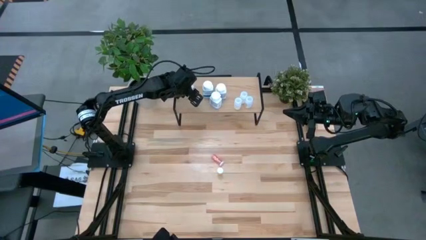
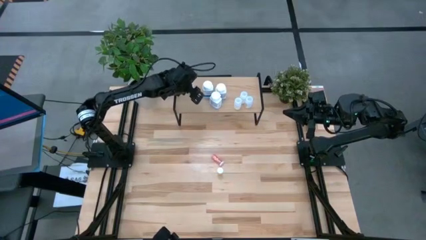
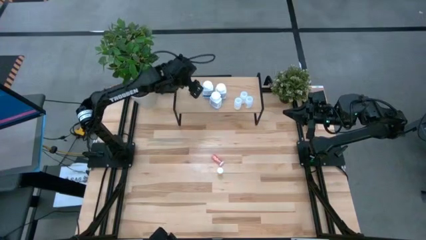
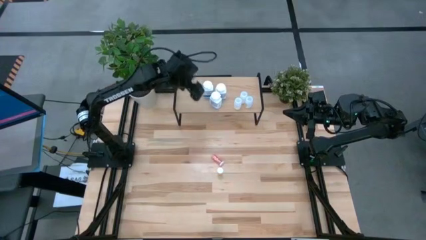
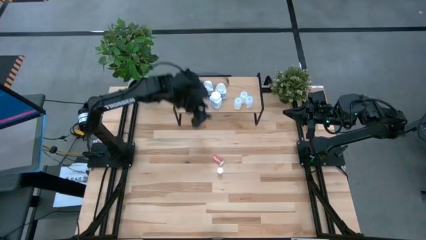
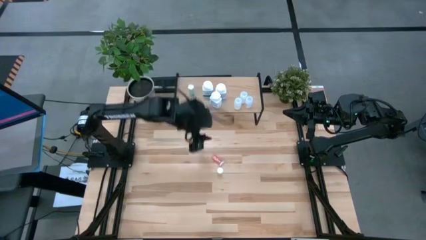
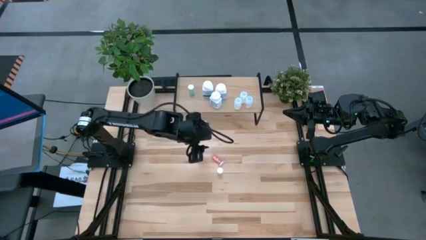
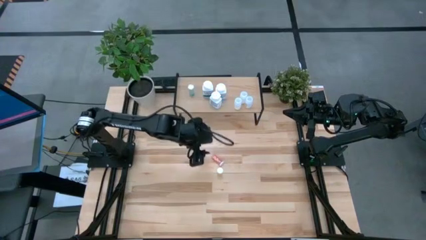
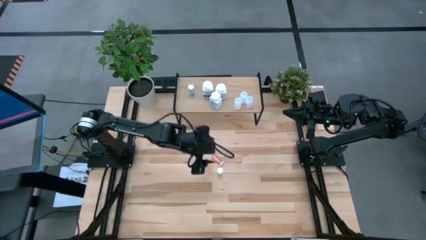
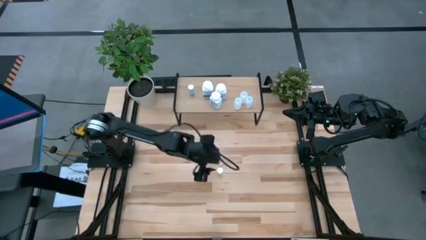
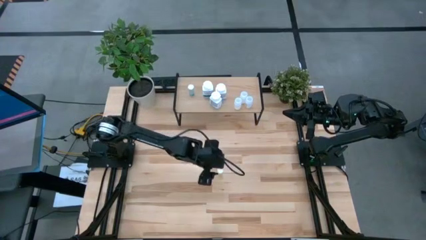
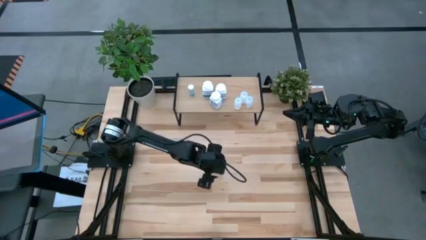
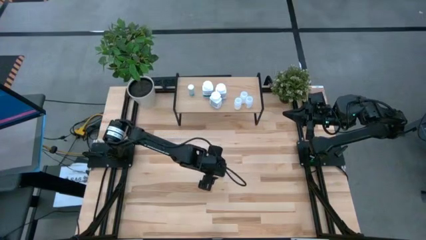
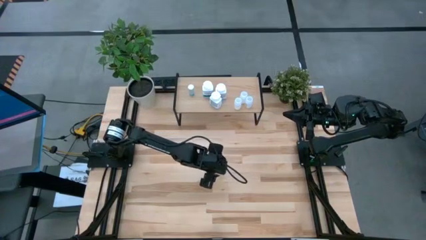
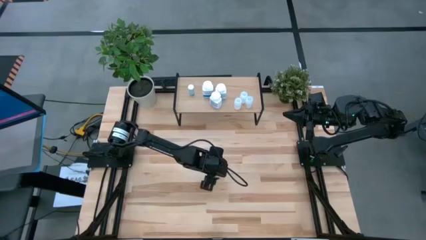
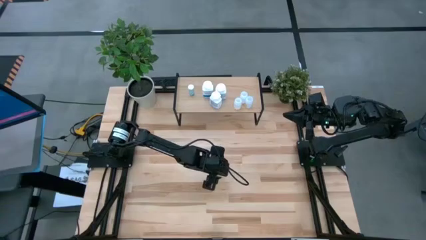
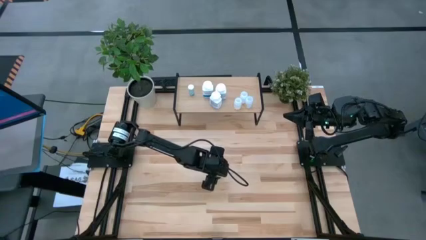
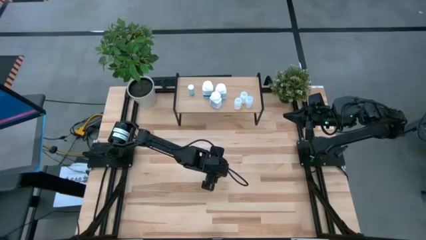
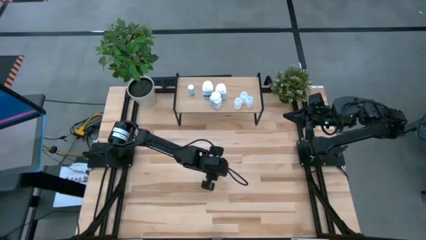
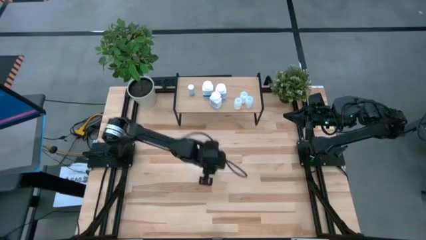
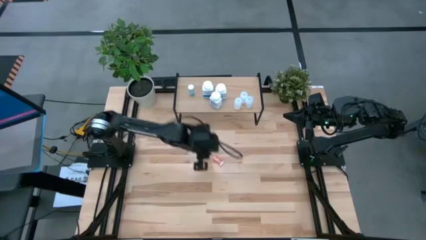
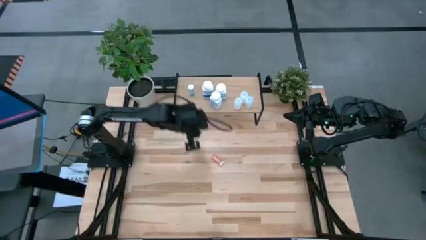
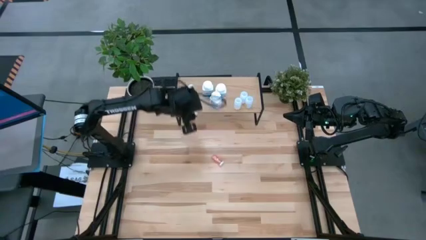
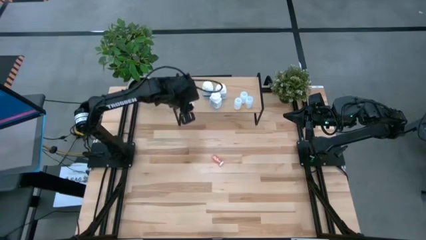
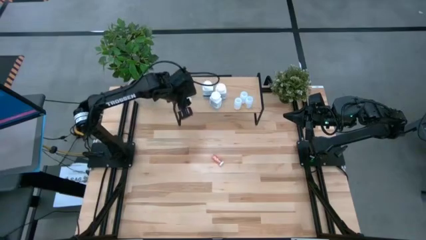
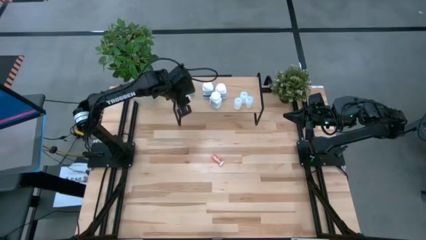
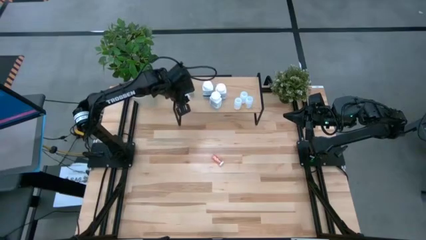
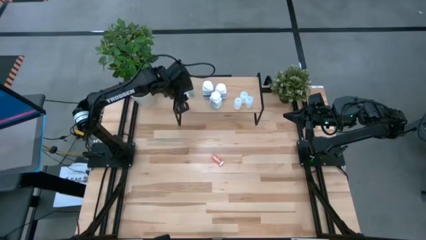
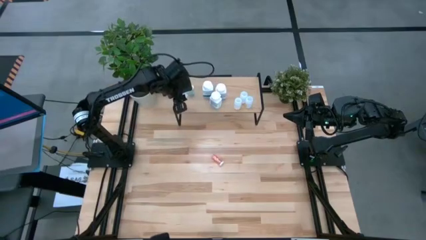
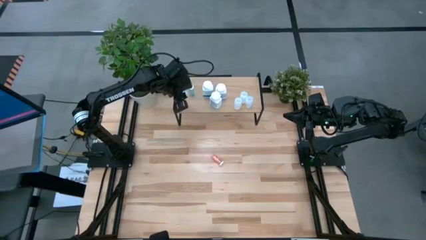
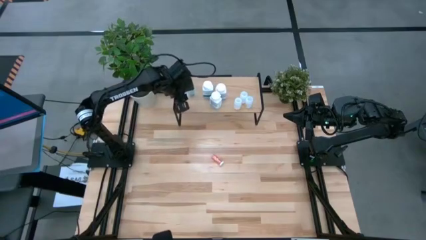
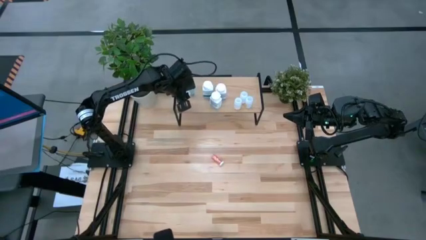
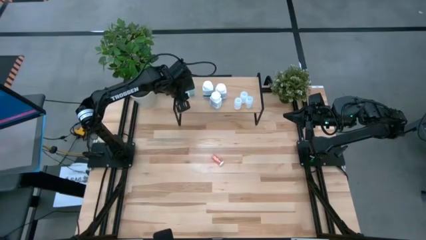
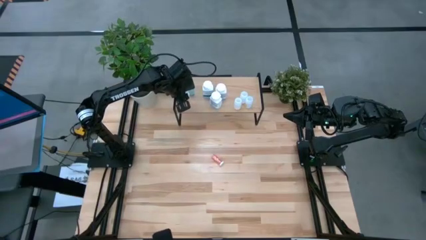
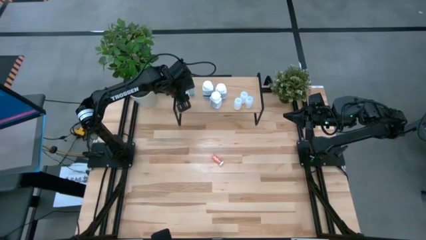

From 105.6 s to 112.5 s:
Task: Pick and place medicine bottles onto shelf by color
Put the yellow pill bottle on the shelf

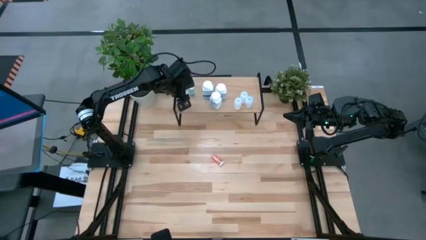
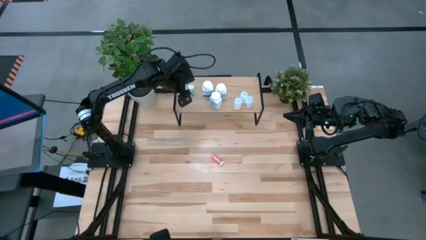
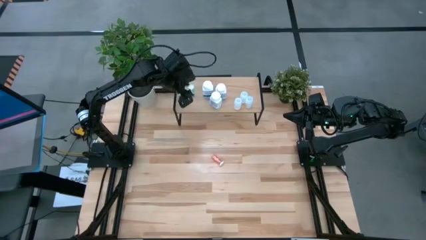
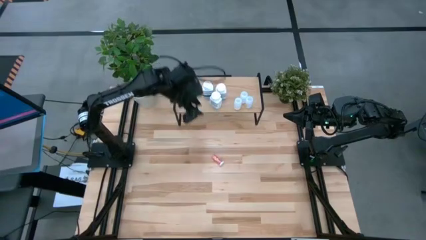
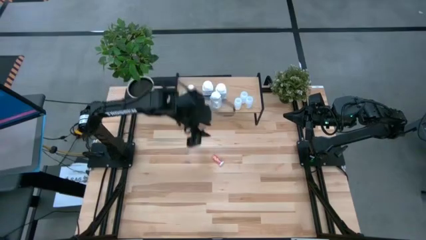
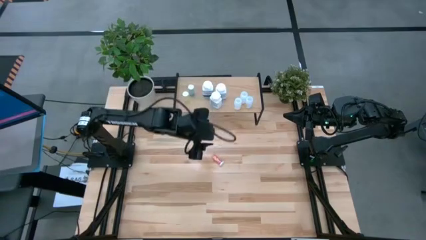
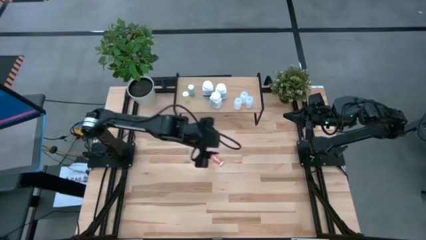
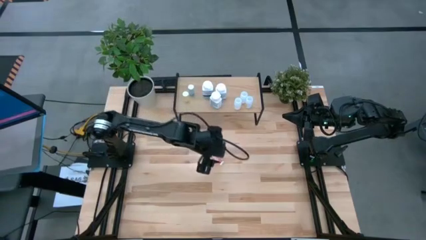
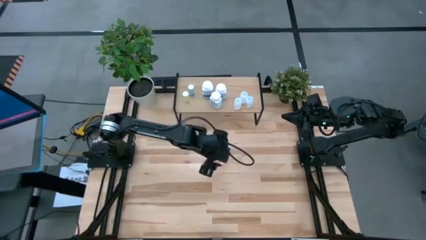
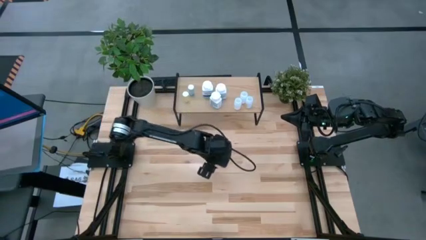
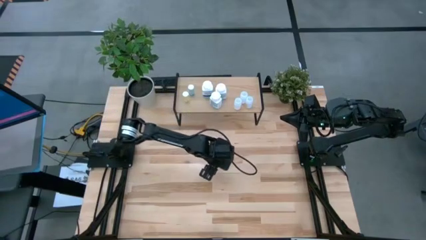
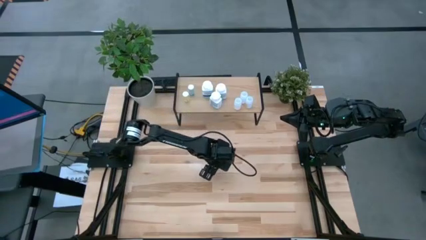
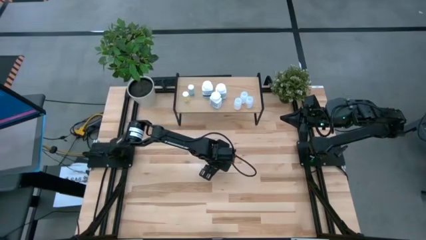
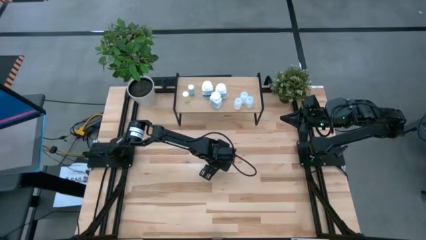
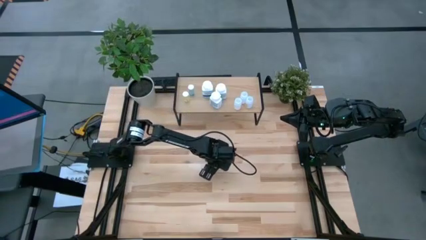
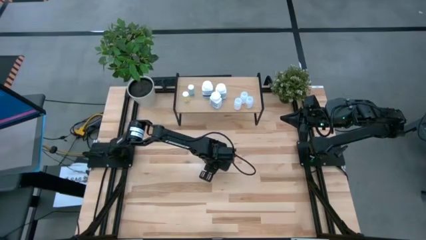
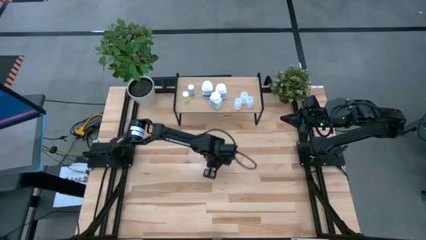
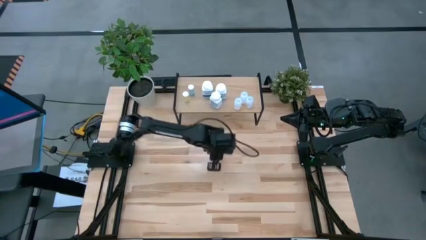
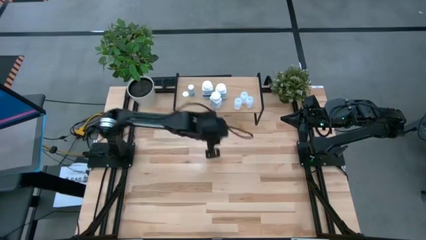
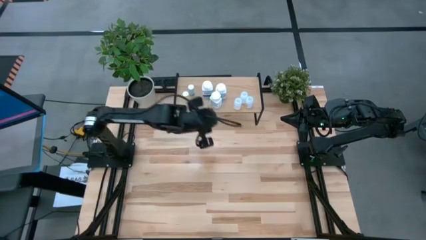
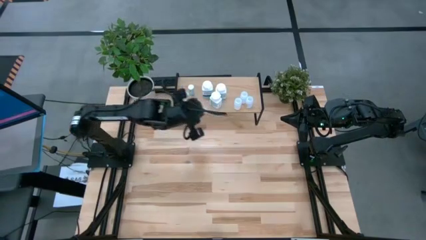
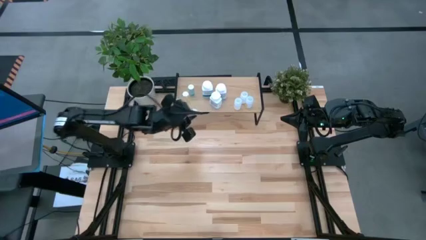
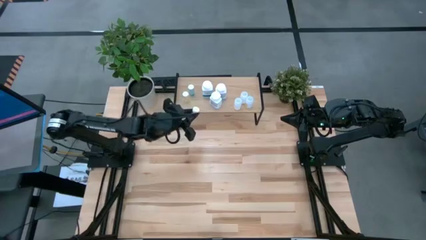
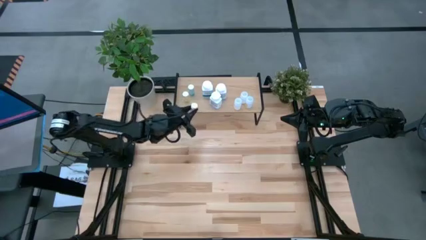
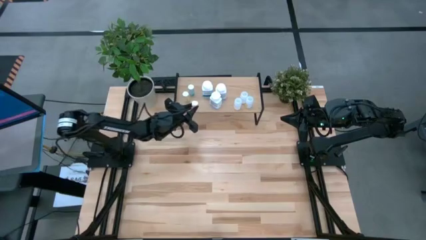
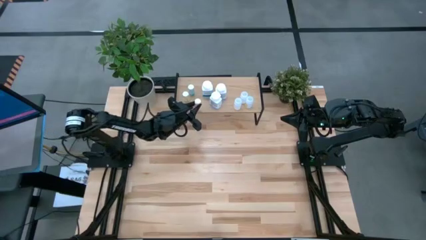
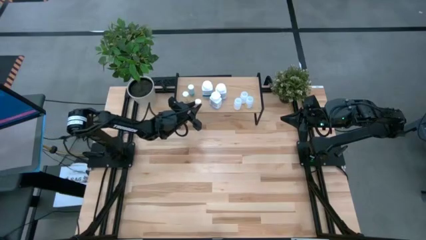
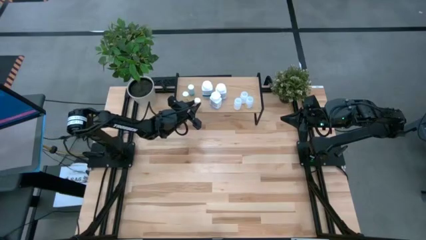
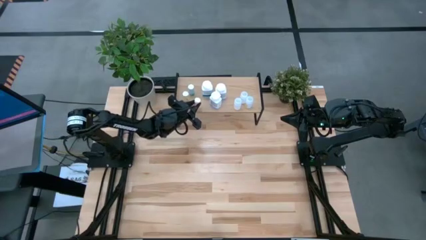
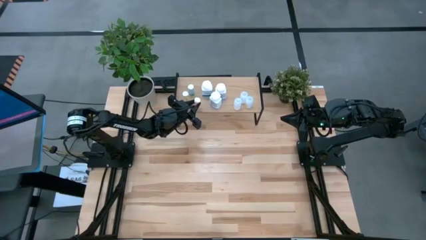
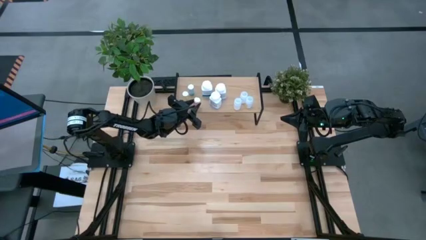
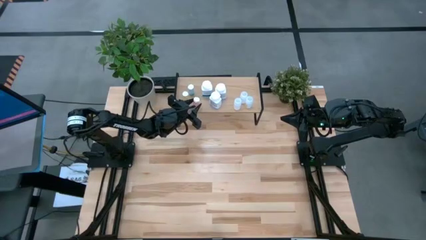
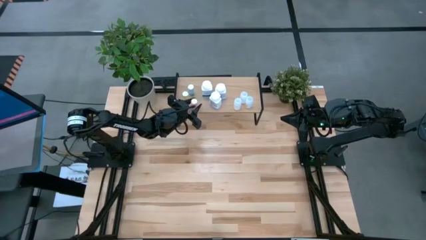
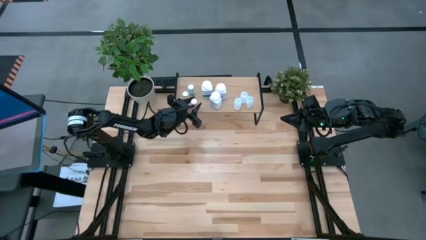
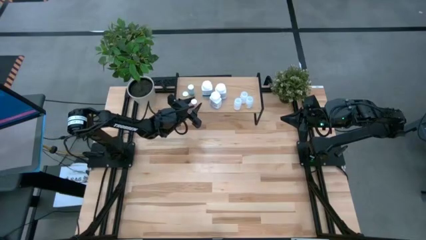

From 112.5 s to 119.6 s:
Put the pink pill bottle on the shelf

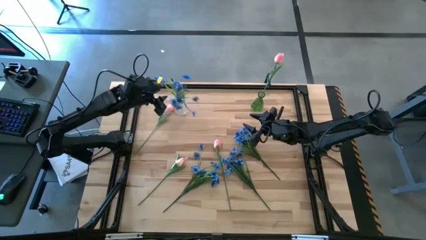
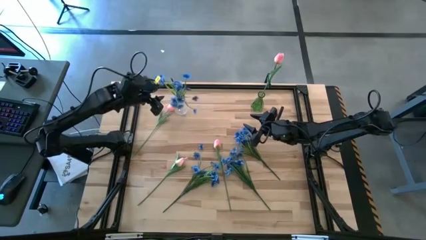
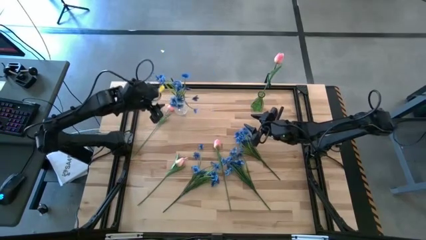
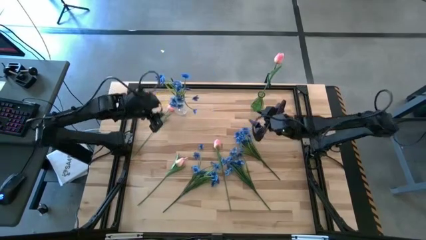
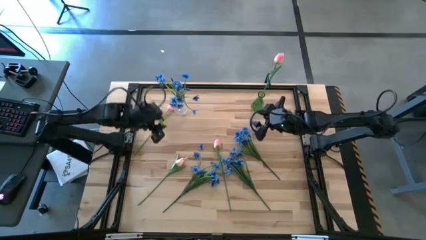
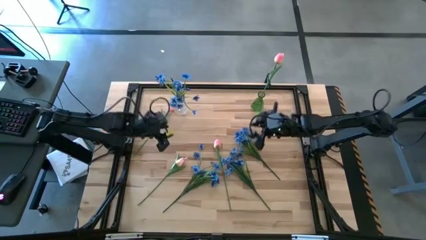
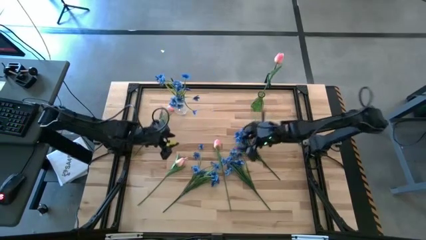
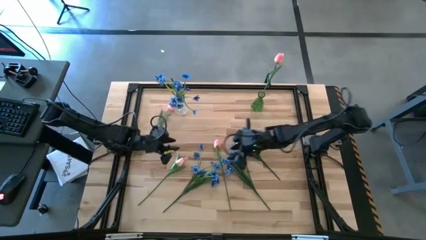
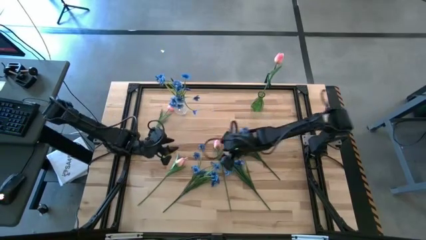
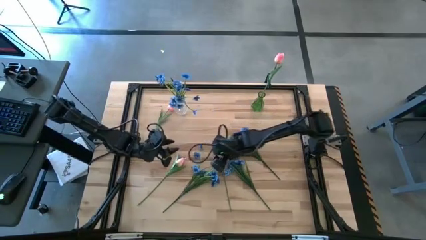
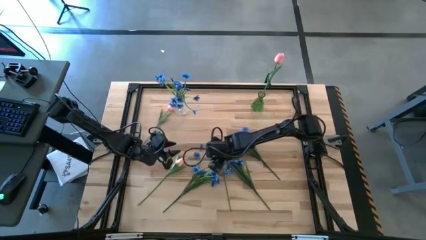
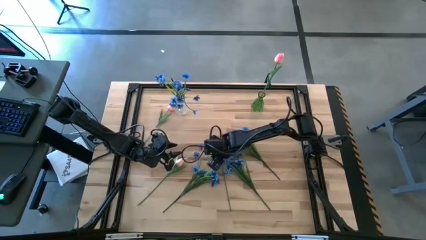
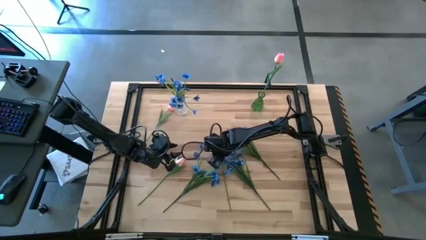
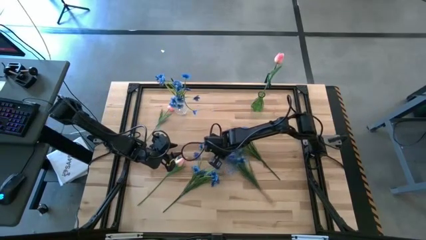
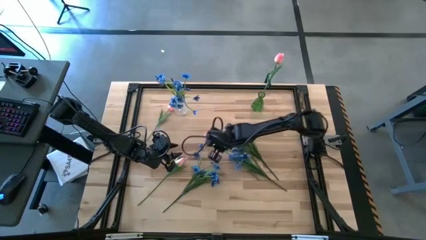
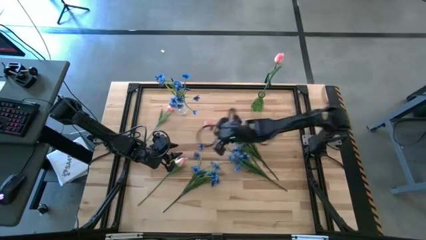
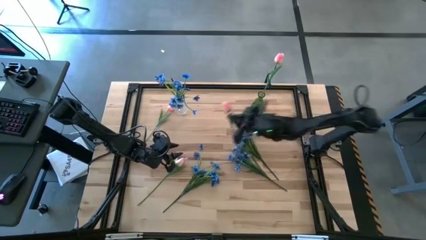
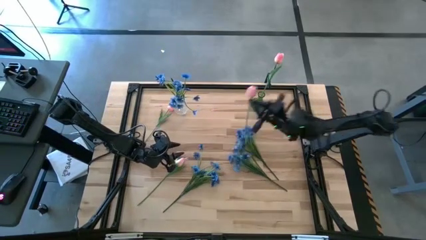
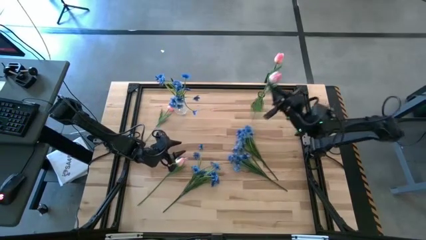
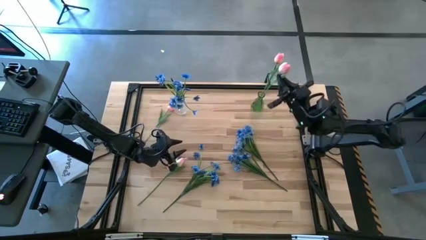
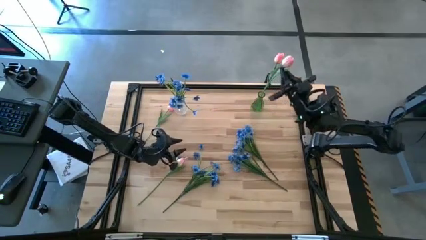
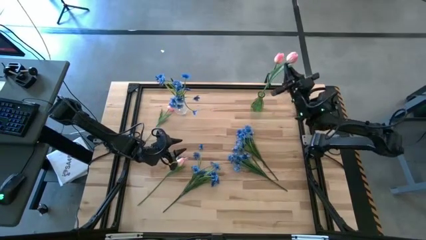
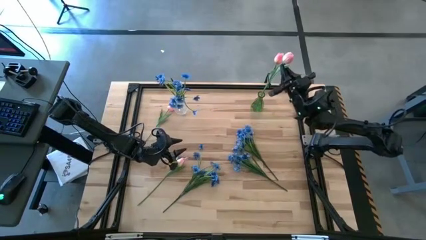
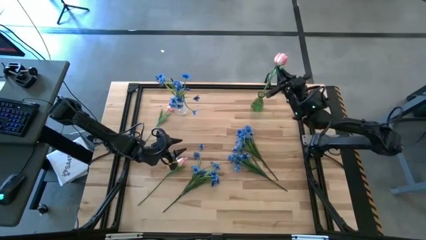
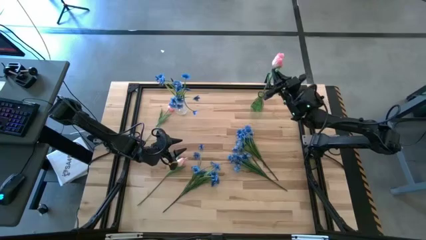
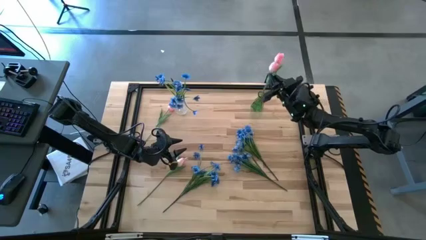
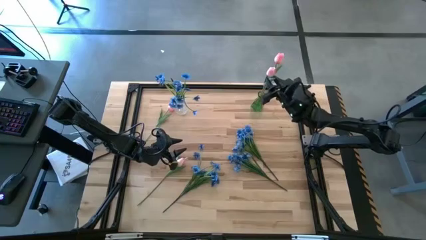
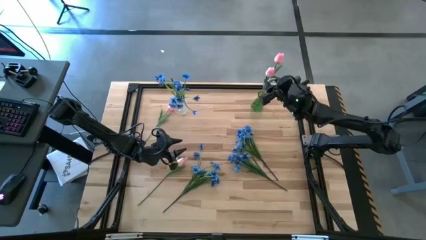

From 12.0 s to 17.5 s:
Task: Sort flowers into vase by color
Put the pink flower into the green vase
